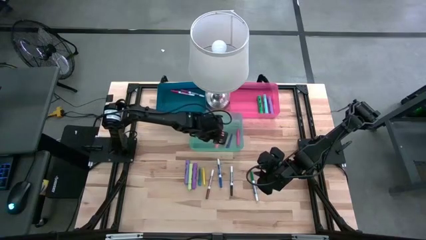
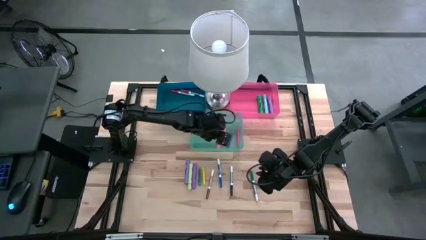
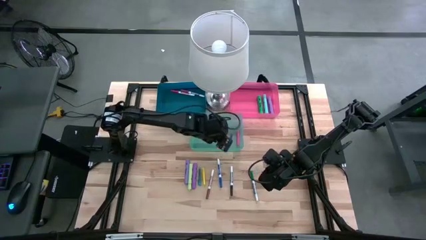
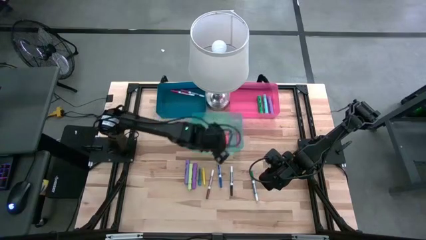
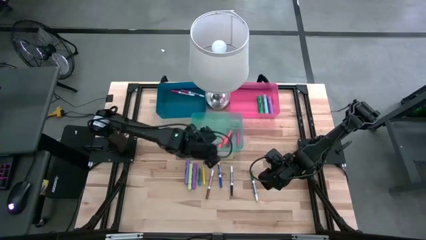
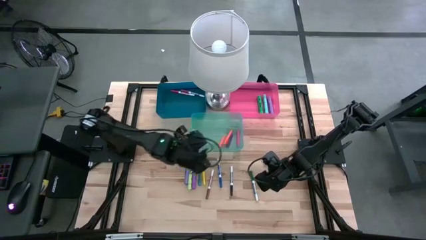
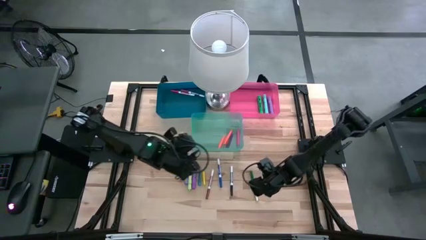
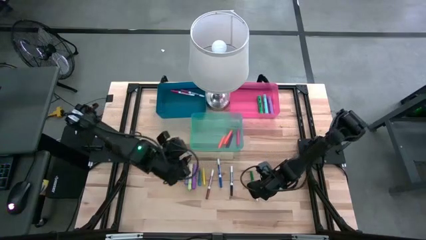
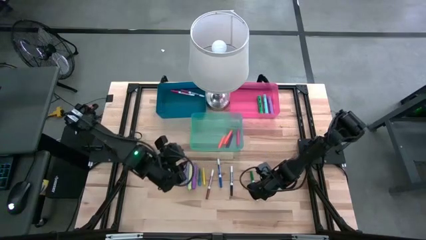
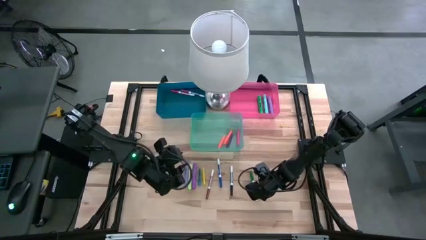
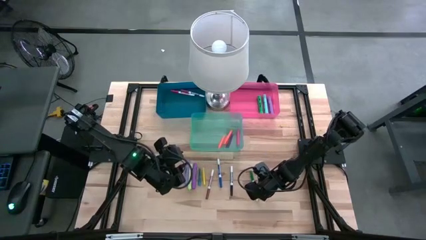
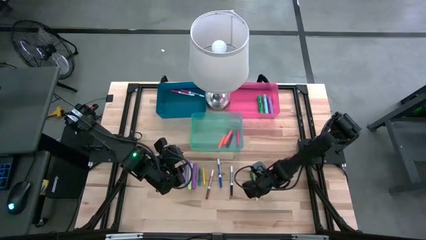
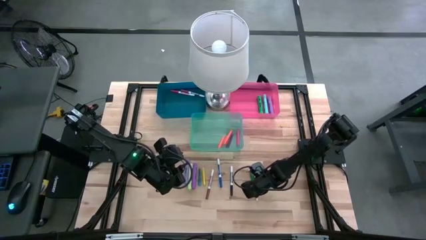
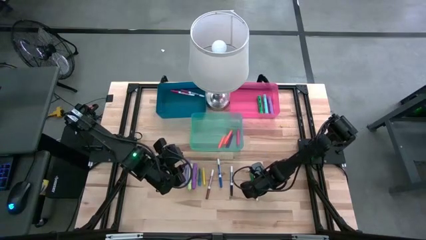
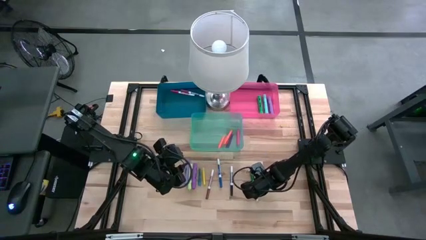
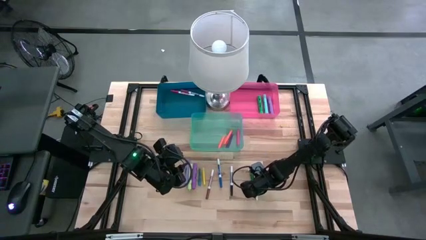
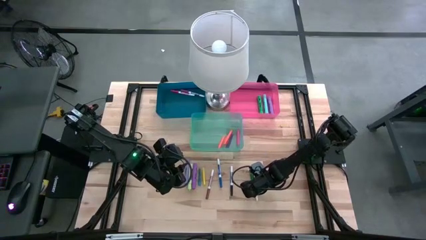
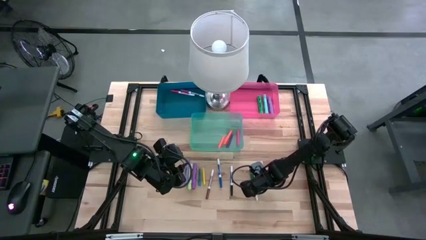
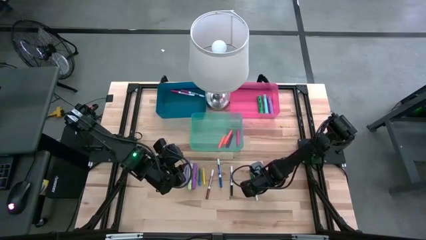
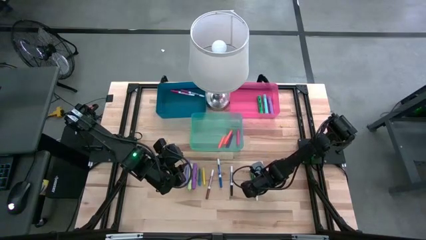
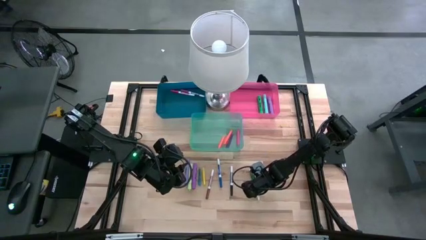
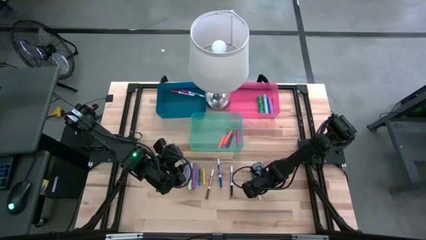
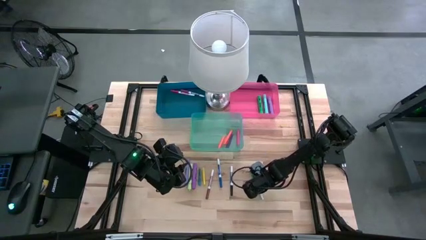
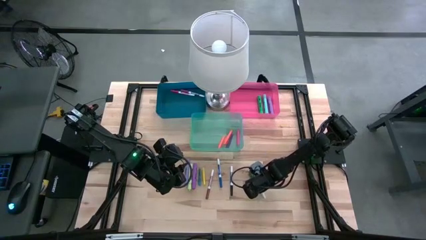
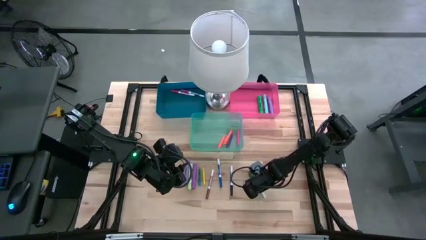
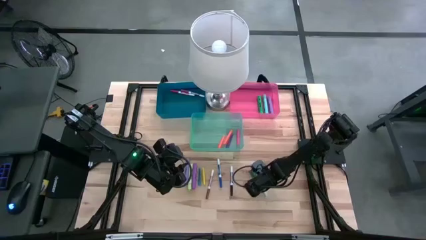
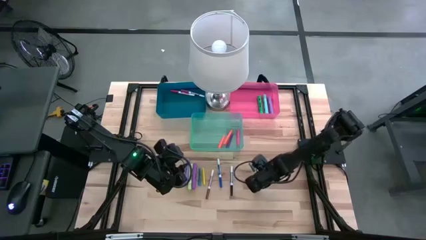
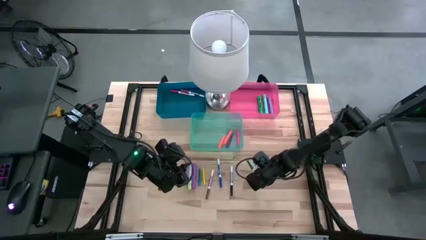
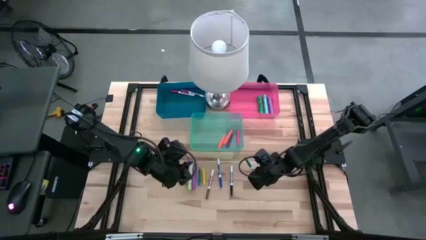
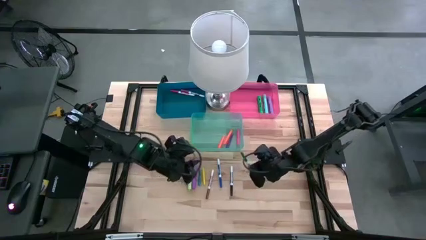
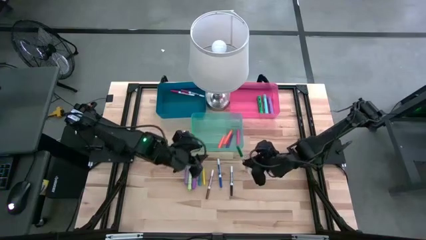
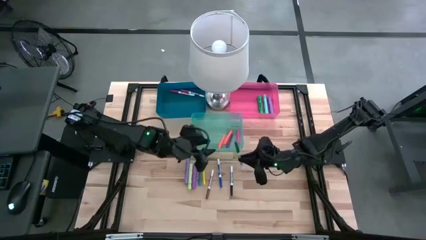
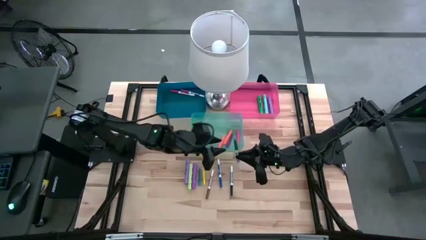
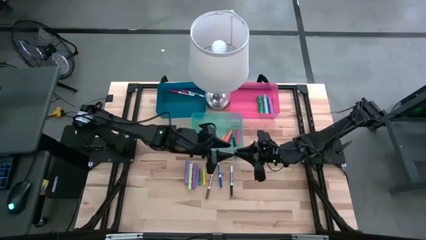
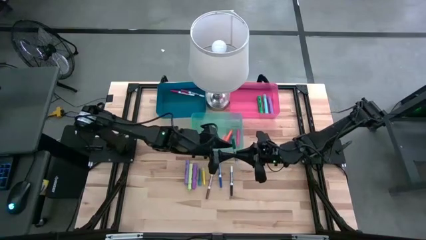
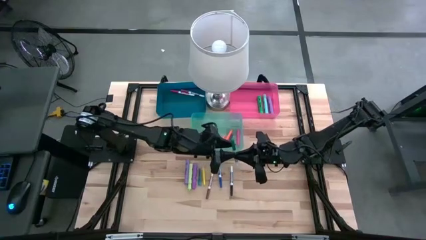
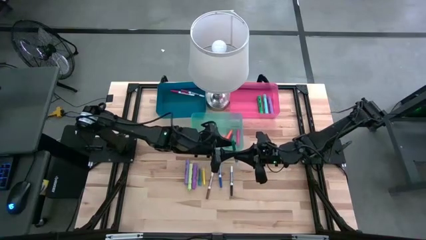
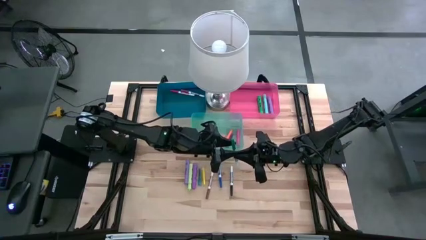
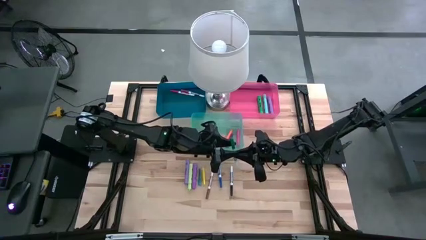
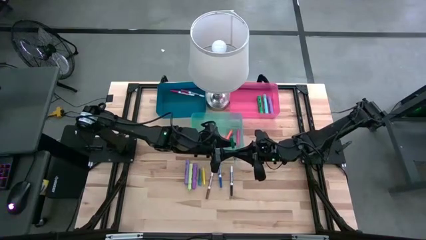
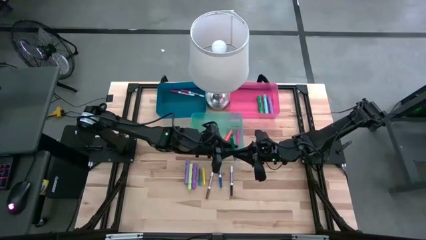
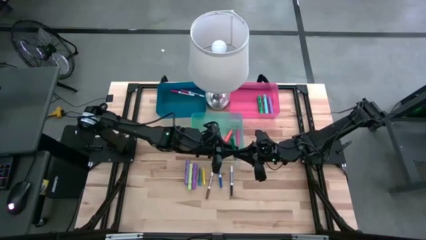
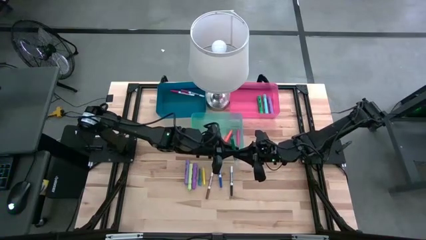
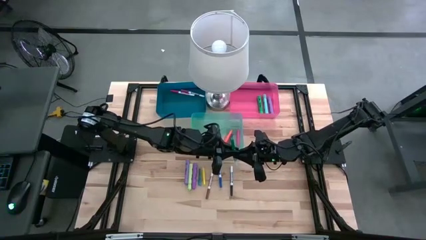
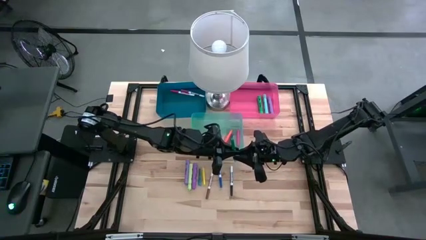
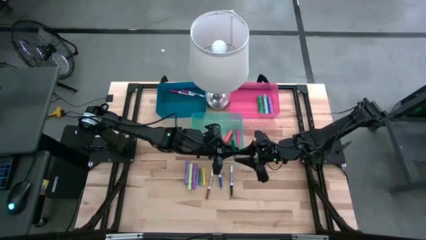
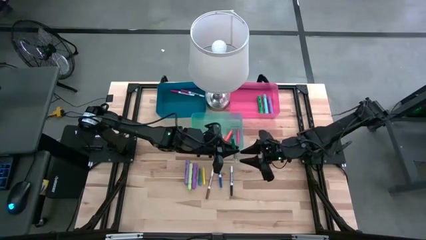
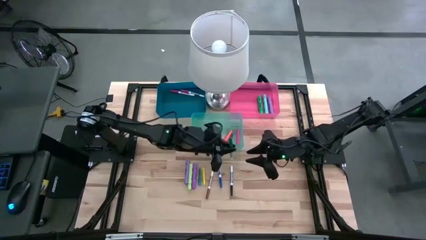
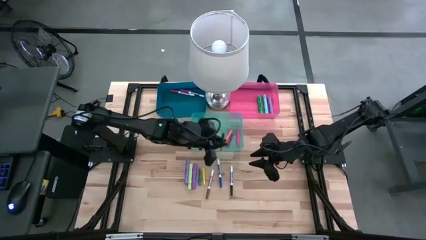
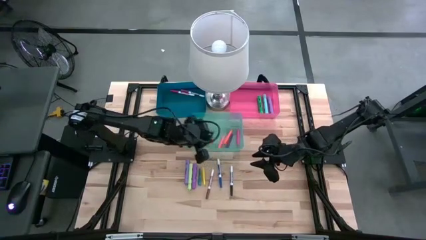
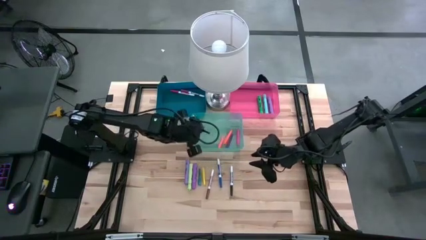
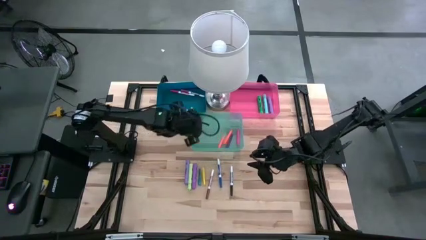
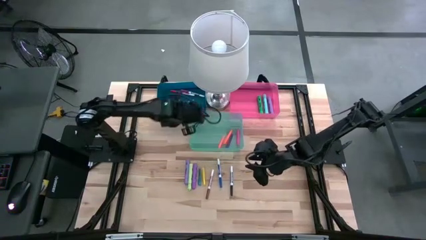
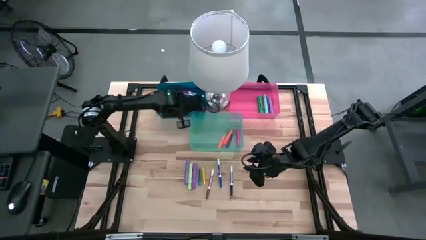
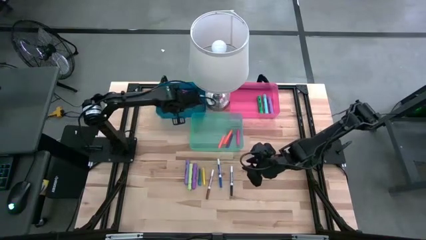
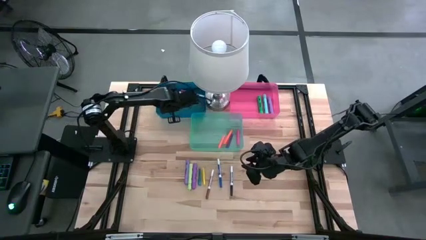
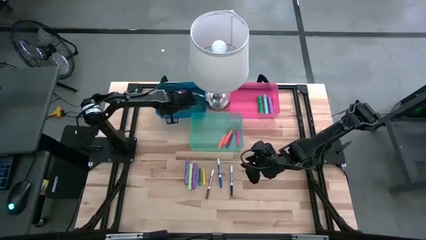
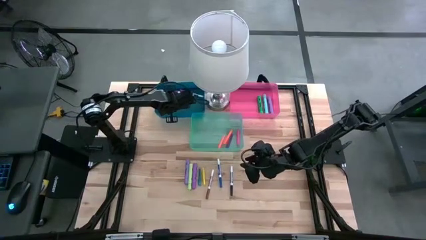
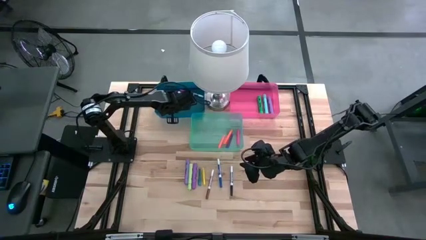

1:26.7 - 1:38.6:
Task: Pick & Place Markers
Put the green marker pen into the blue bin

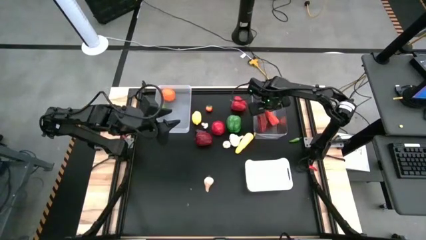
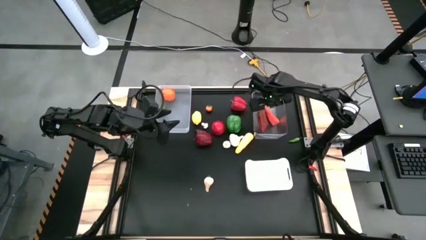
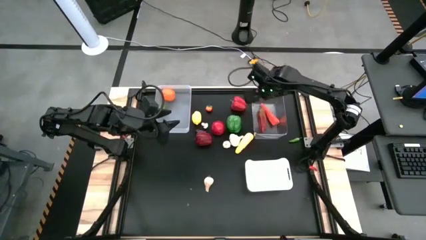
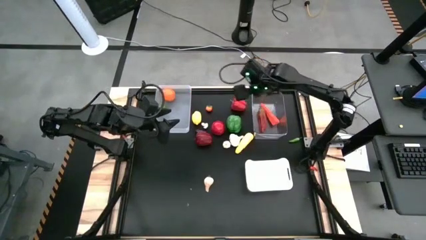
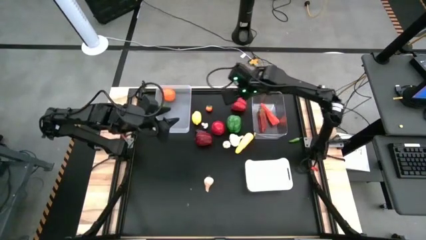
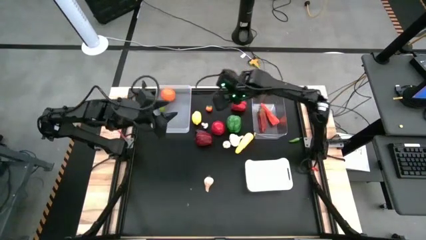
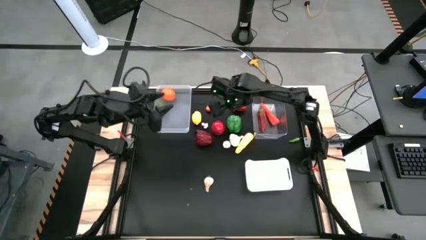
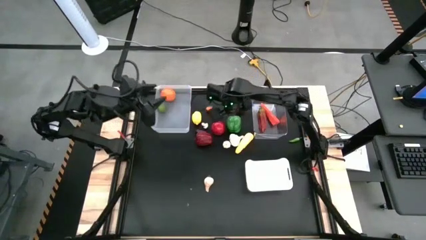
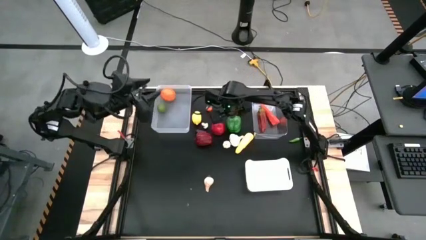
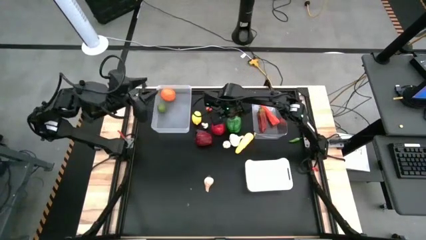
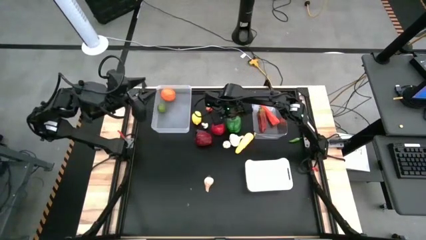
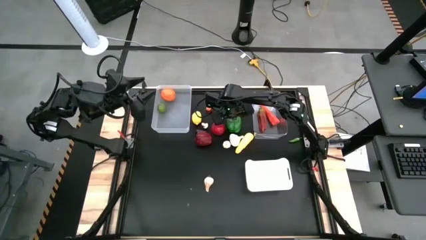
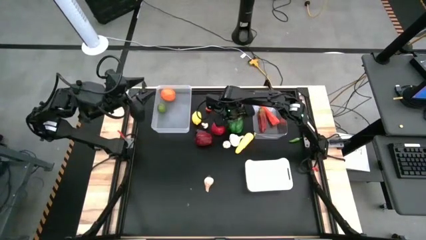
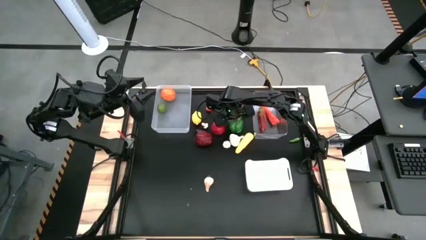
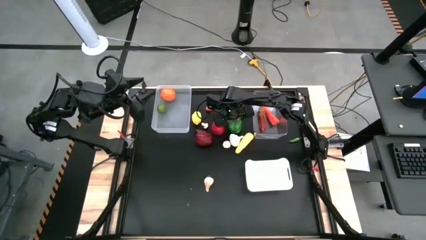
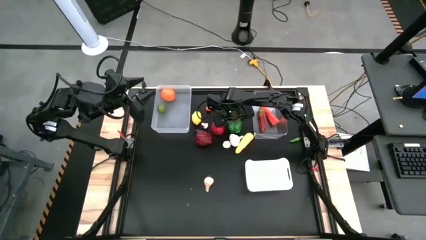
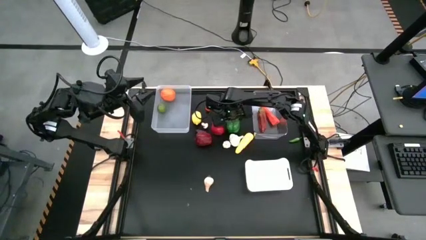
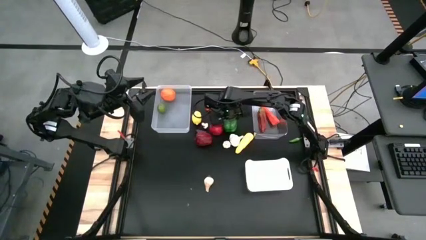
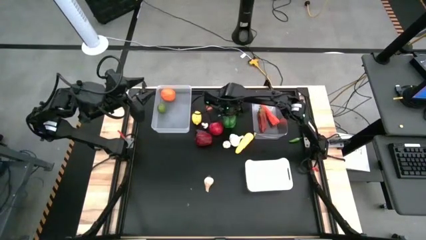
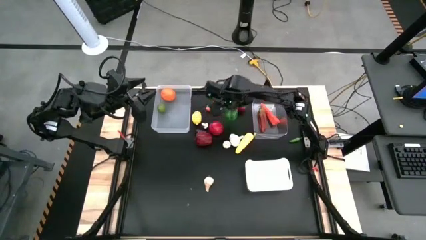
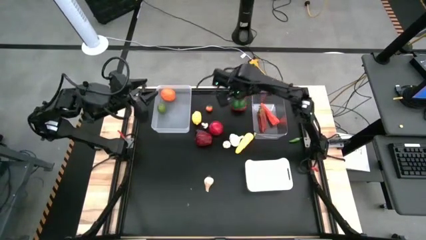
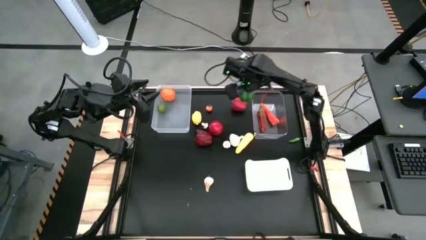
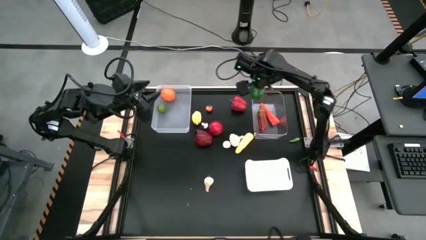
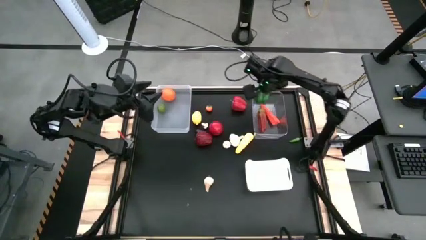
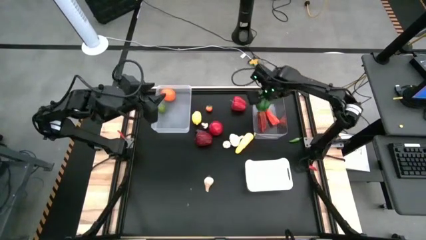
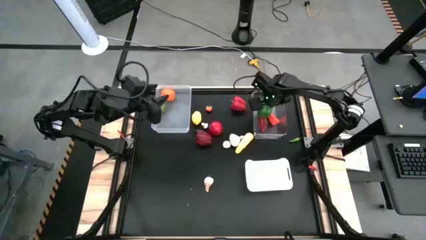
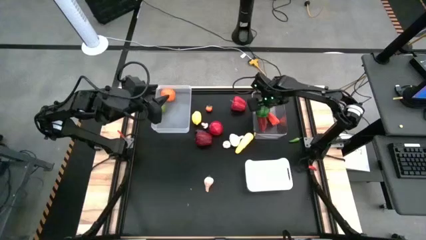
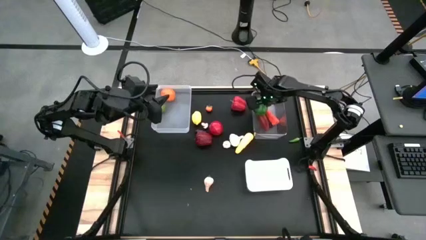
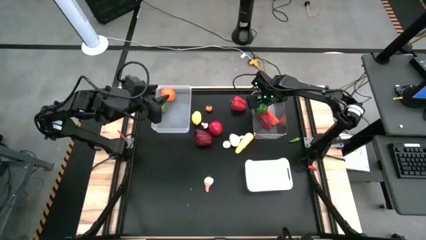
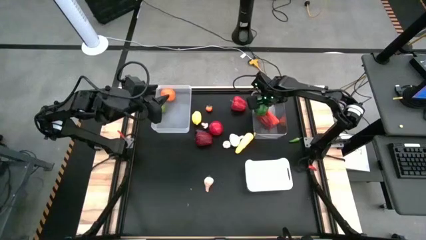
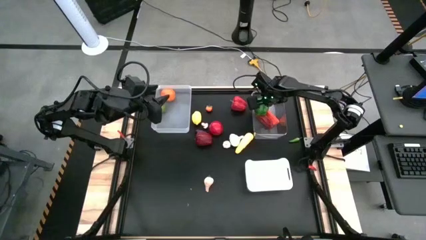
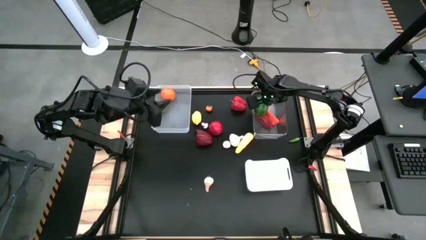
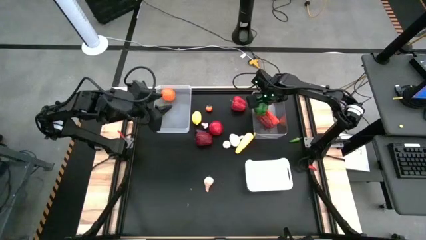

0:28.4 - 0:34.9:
Task: Sort produce into baskets
Put the green bell pepper into the transparent bin
